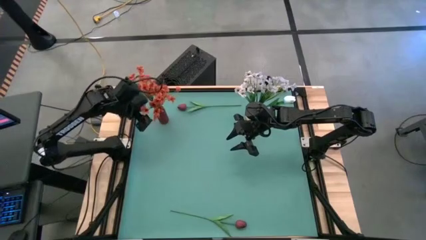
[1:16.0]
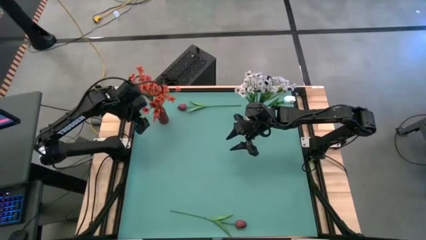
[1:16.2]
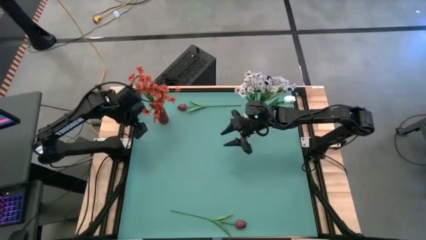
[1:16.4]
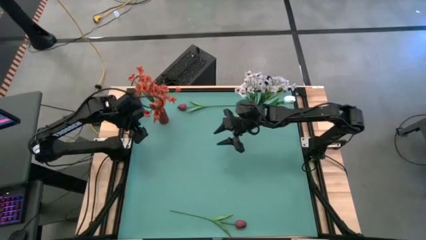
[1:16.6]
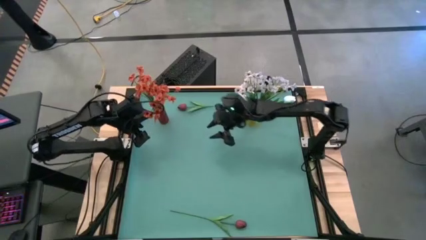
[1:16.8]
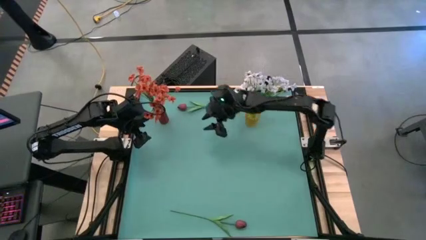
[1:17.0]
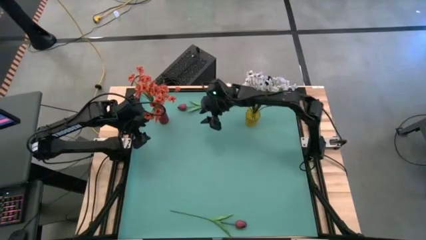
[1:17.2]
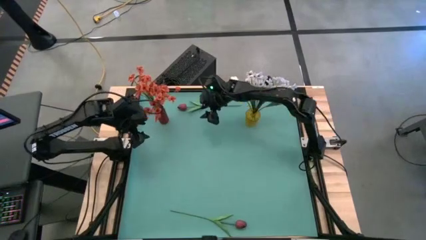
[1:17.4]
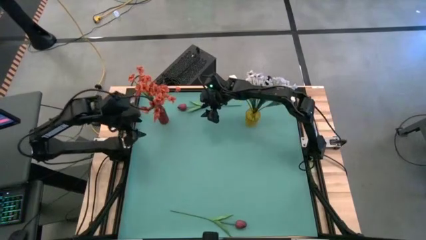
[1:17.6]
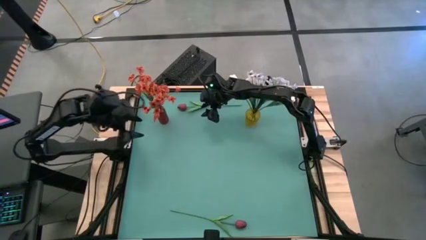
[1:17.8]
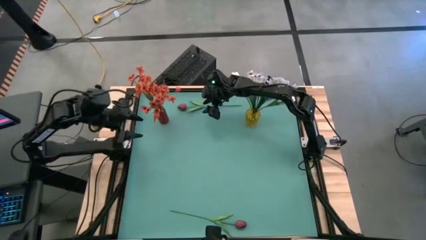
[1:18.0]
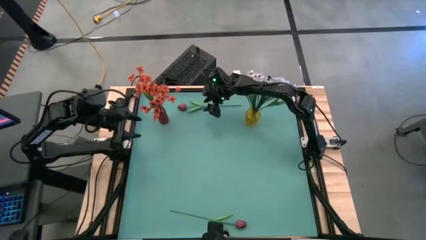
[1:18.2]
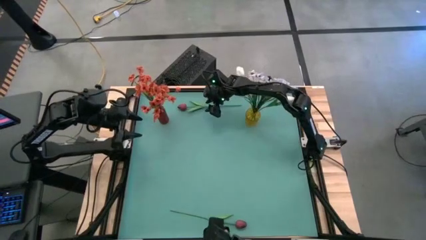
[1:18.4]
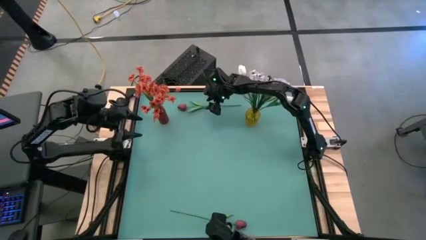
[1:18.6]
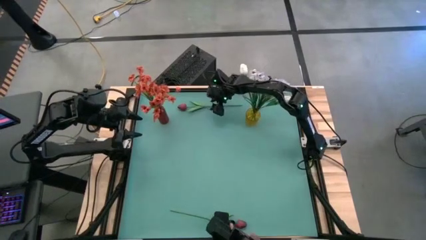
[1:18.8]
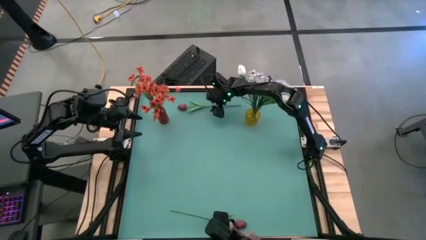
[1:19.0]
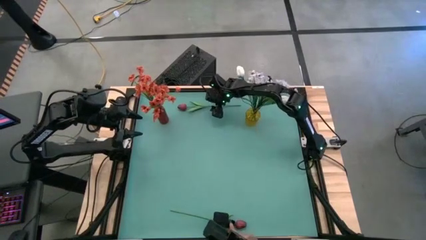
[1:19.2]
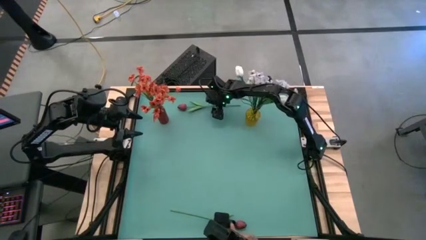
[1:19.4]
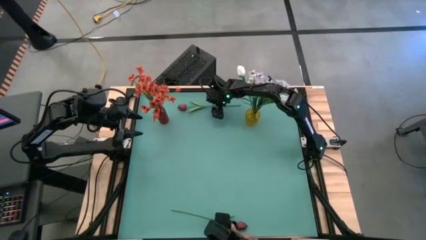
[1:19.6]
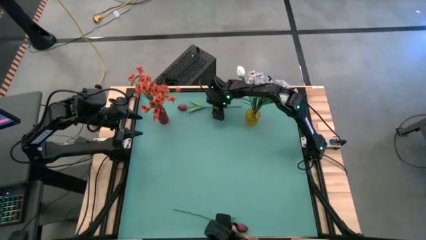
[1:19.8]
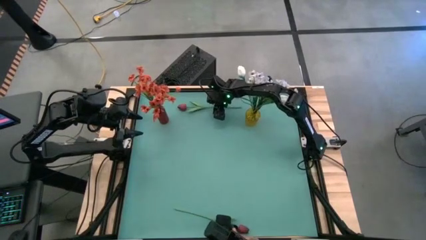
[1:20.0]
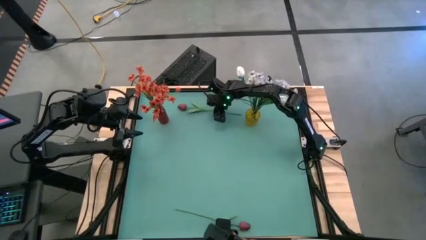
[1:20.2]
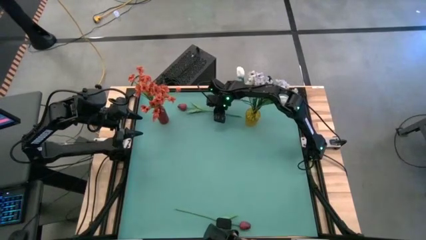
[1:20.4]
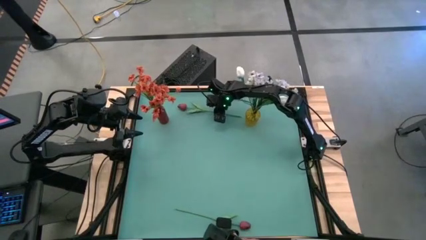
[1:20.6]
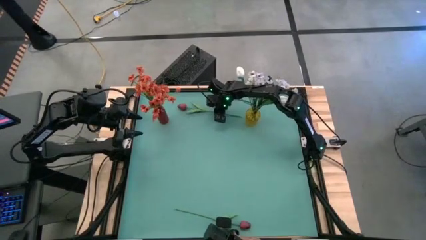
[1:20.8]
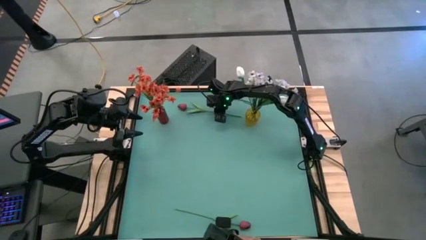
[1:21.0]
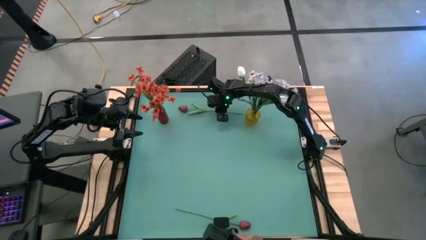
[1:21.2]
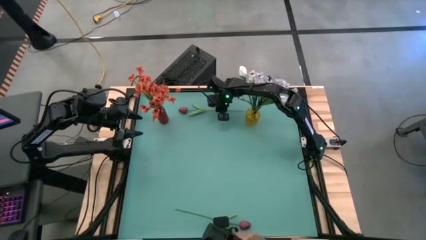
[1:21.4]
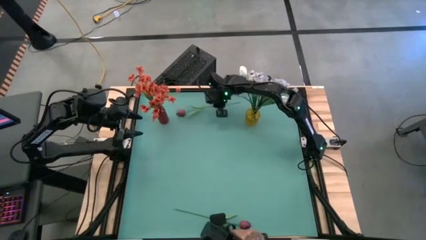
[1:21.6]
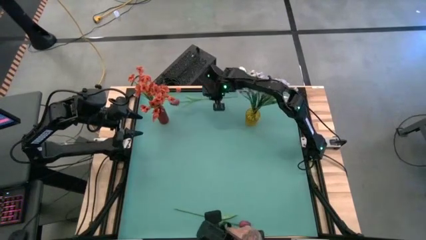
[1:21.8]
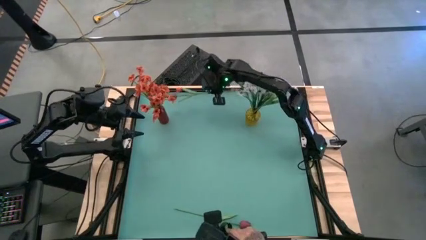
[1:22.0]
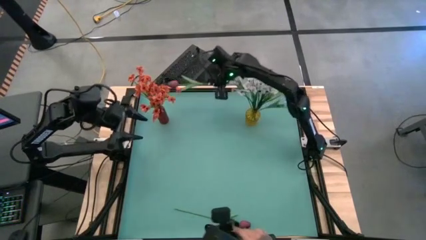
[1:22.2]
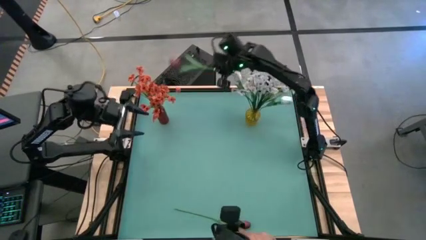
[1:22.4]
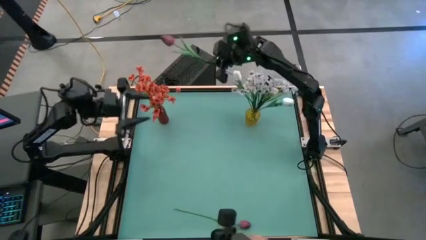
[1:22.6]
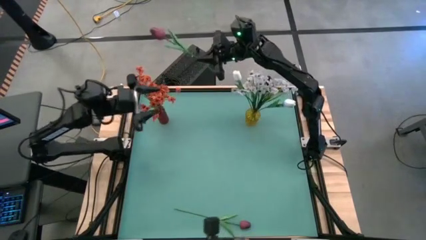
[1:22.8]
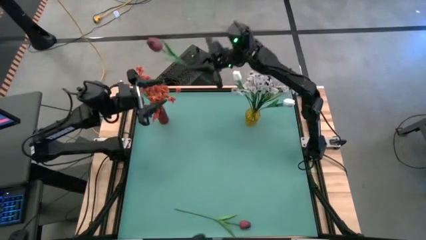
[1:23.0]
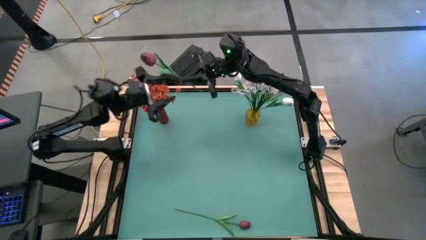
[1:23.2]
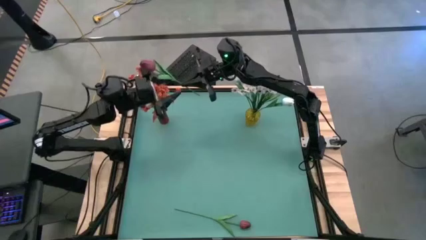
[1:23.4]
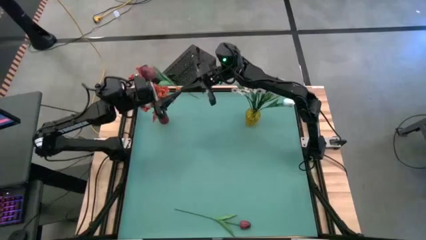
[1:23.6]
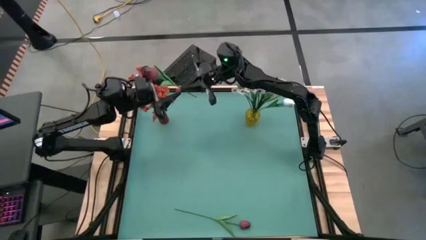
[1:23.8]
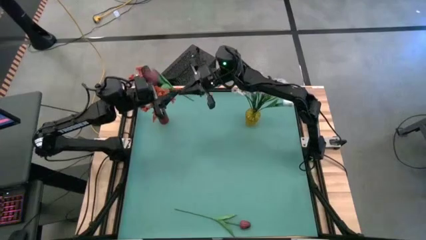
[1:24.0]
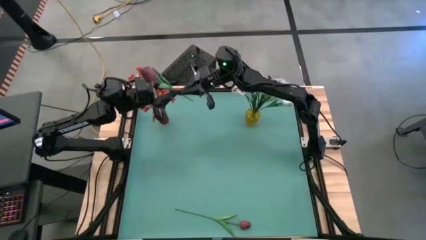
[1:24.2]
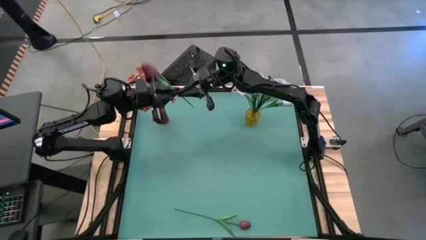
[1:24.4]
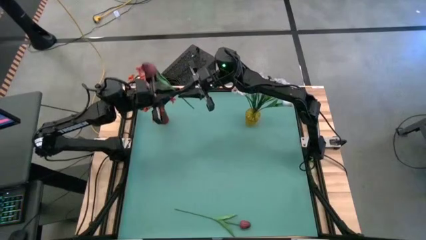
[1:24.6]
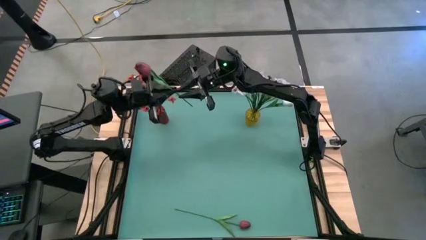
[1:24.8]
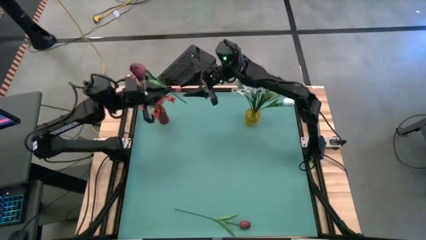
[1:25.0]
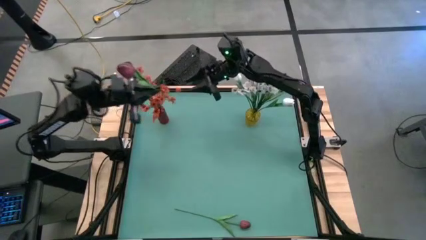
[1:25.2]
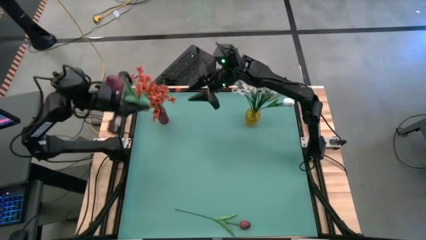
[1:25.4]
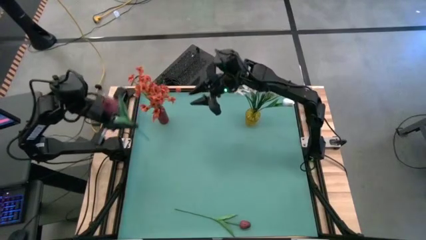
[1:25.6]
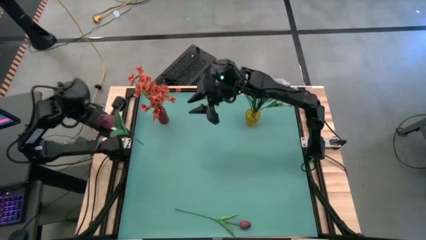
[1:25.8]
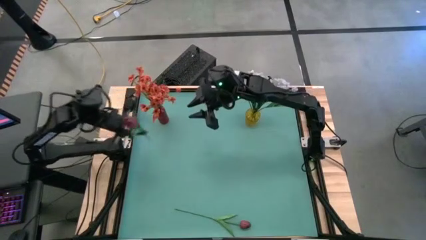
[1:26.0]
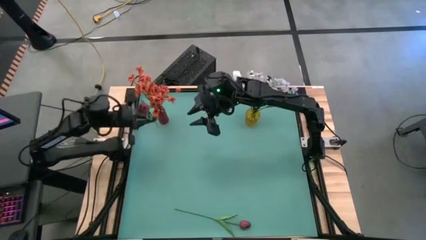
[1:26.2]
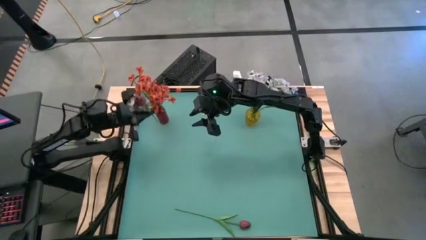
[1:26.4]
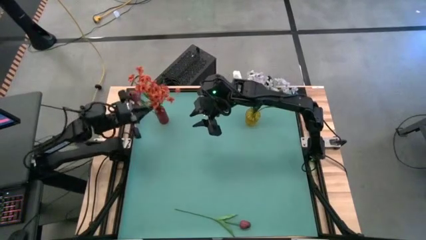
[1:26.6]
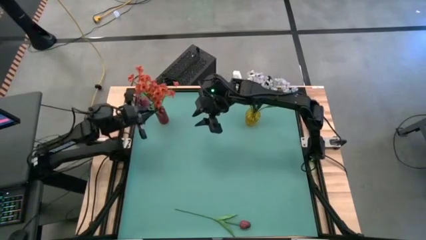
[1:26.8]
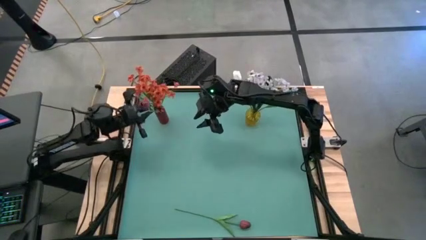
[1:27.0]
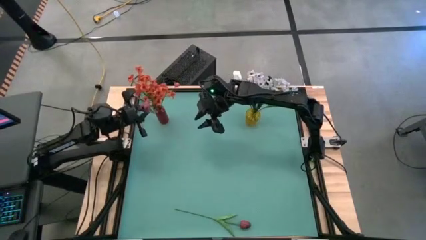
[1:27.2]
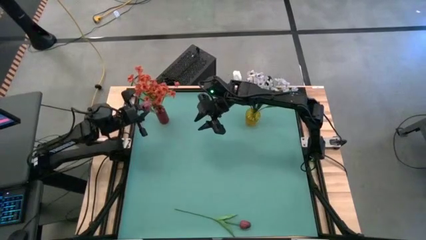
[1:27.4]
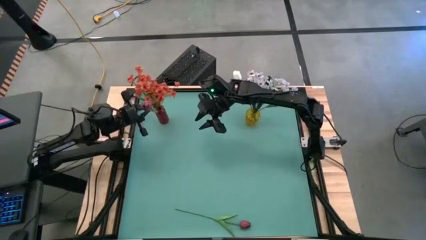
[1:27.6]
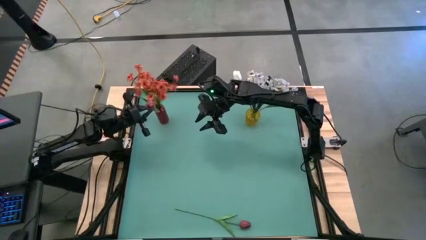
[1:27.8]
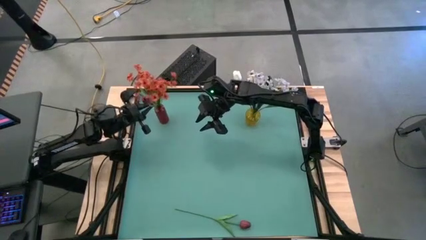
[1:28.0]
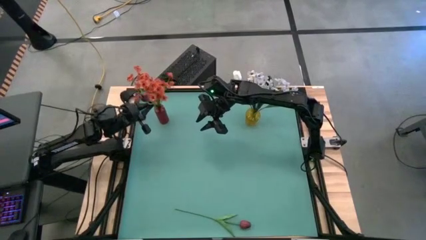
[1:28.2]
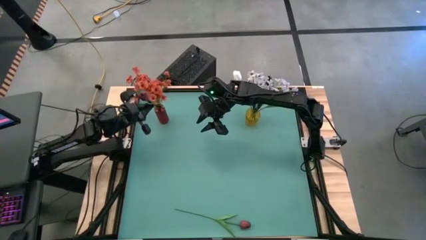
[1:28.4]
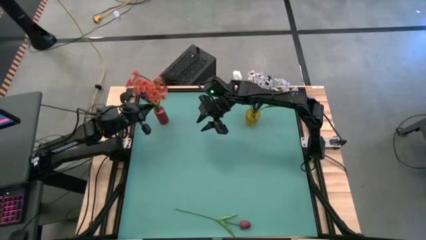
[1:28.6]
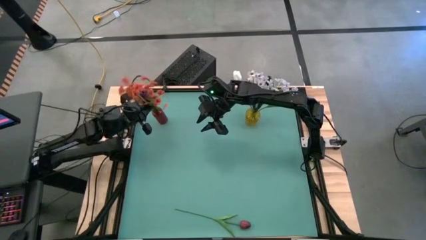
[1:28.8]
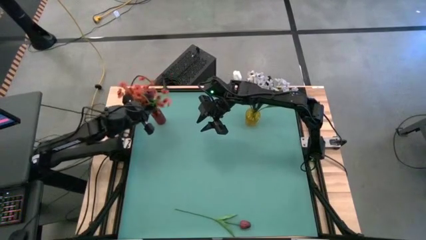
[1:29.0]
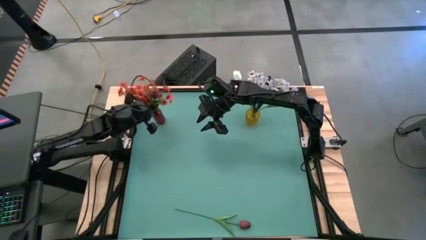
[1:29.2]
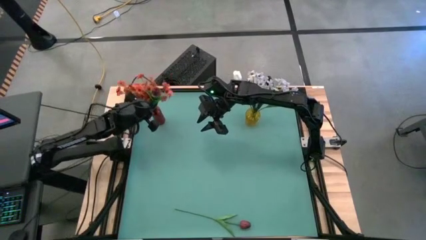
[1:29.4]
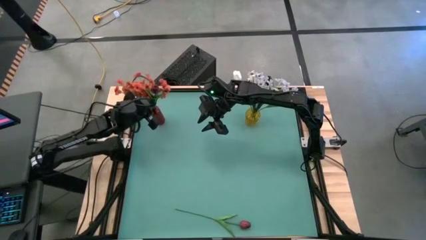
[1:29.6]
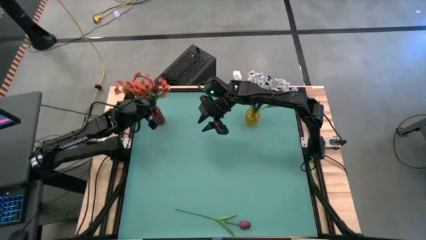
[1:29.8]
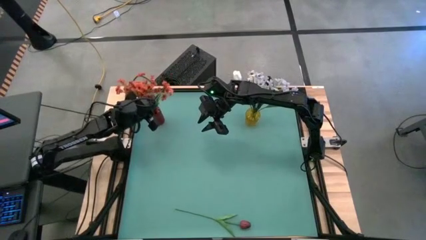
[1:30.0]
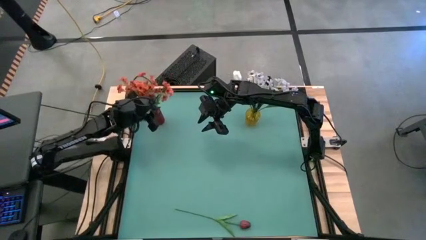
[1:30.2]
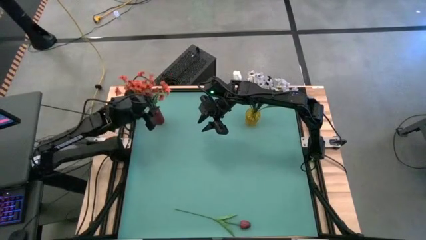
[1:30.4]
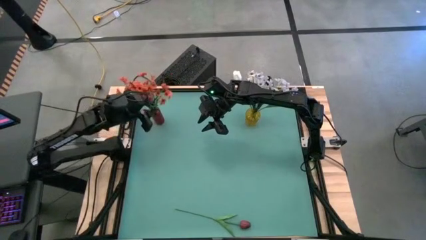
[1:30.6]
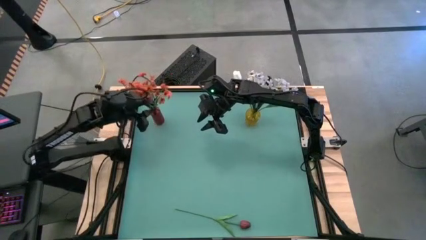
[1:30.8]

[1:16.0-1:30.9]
Task: Sort flowers into vase by color
Put the top dark red flower into the red flower vase

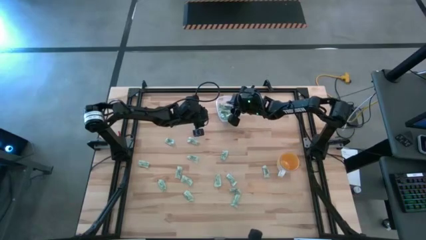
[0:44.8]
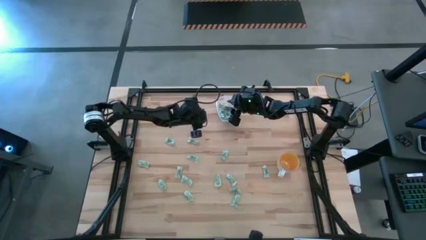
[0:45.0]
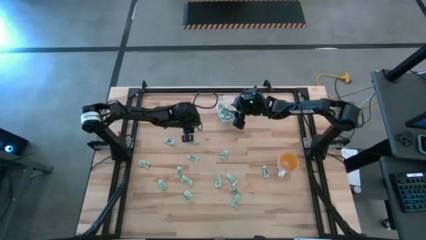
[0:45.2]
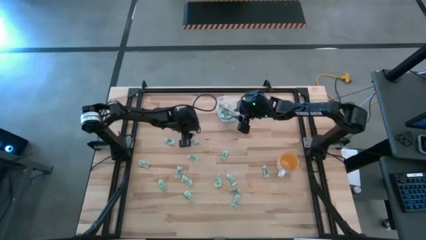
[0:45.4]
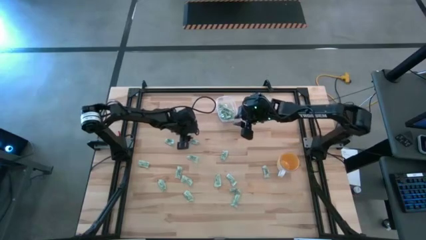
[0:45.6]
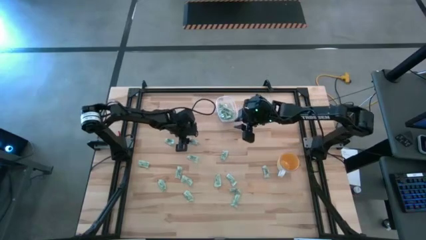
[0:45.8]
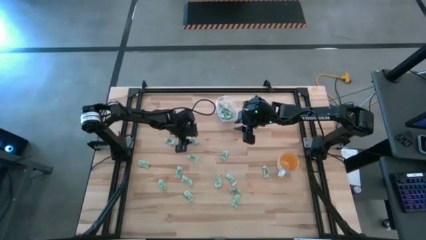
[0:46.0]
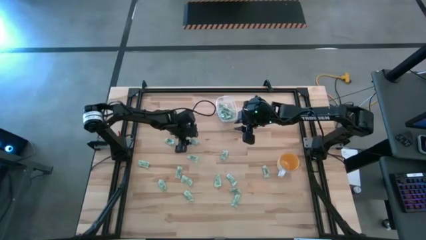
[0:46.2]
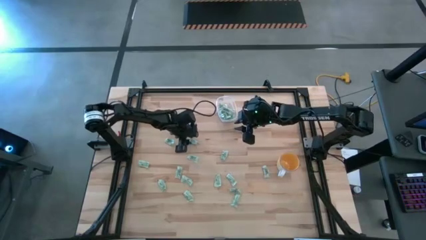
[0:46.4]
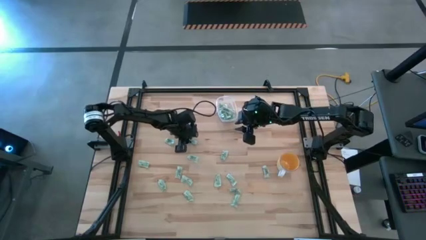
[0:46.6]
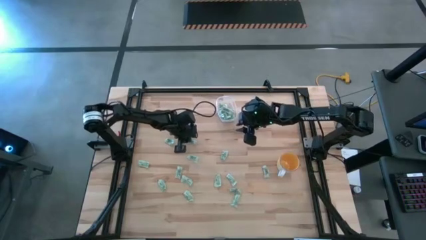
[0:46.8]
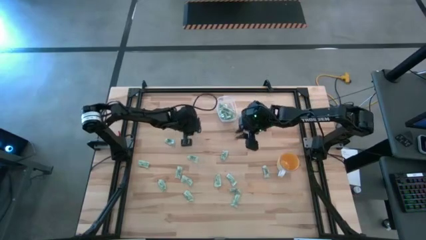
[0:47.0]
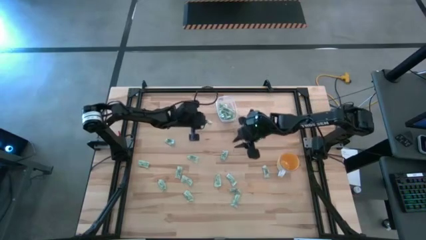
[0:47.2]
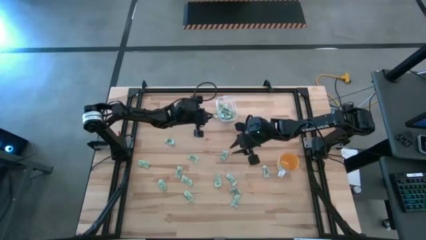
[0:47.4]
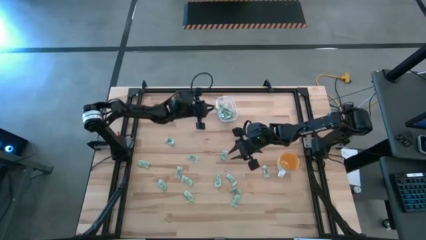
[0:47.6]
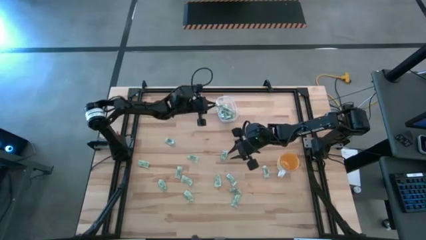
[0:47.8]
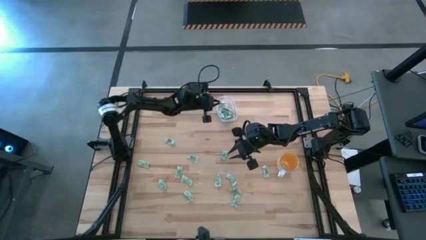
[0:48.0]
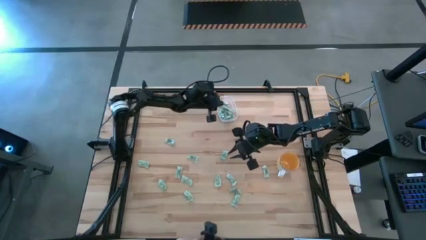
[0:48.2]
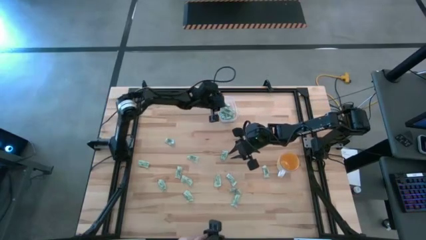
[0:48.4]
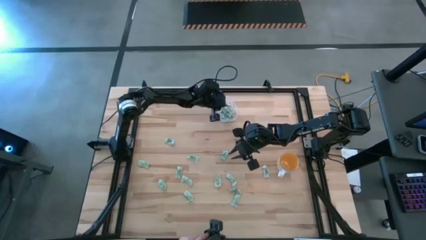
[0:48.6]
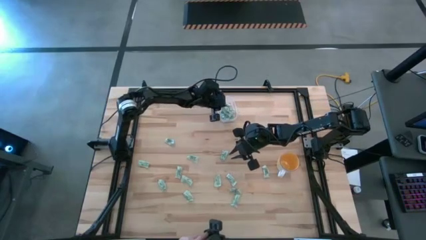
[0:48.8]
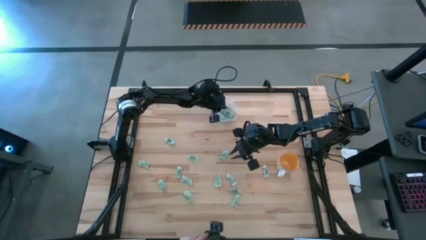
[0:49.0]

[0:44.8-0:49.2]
Task: Pick and place Stevia / Truvia into bins
Put the green stevia packet into the transparent bin
